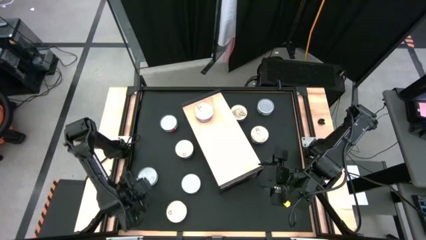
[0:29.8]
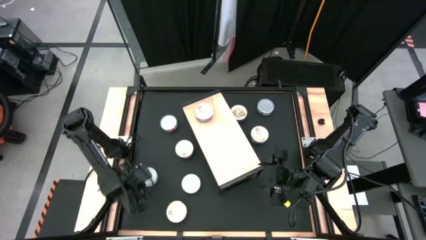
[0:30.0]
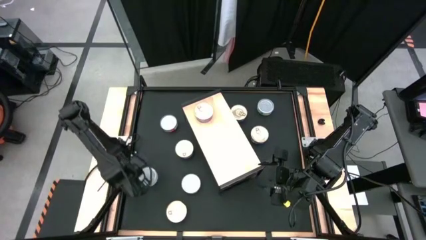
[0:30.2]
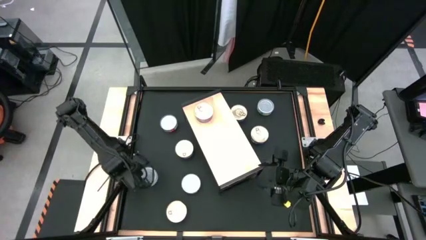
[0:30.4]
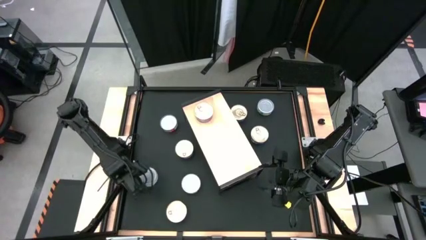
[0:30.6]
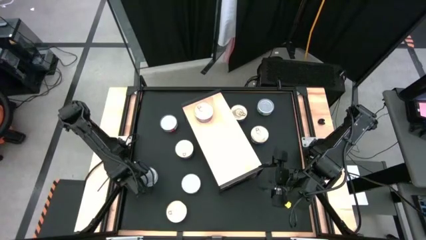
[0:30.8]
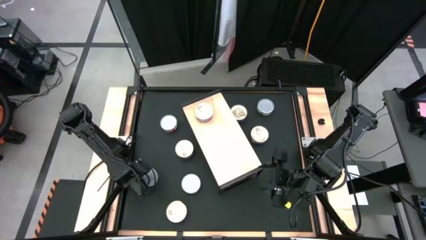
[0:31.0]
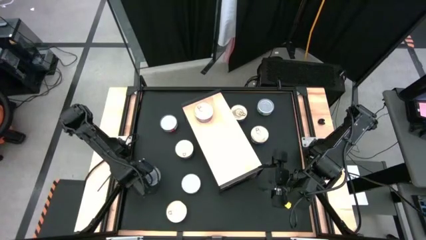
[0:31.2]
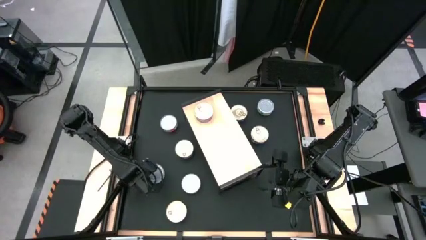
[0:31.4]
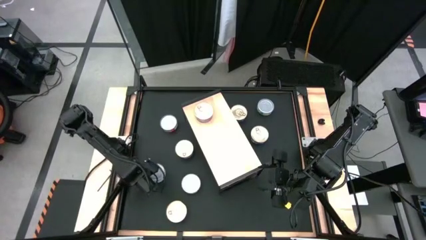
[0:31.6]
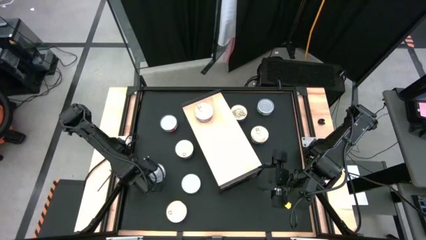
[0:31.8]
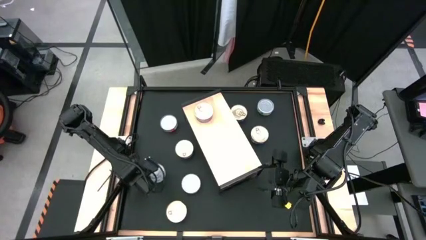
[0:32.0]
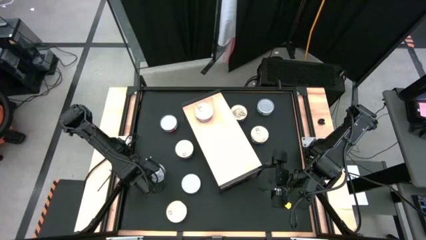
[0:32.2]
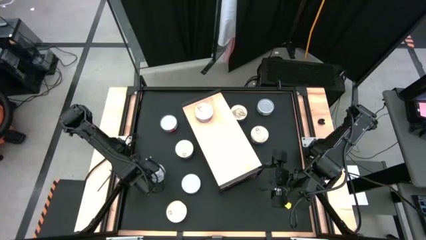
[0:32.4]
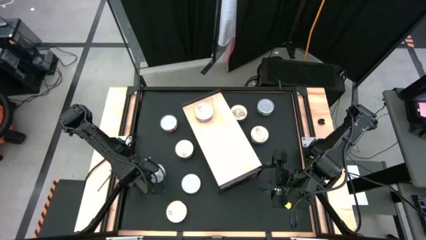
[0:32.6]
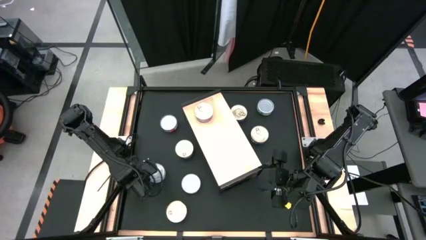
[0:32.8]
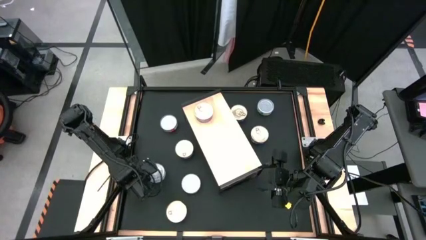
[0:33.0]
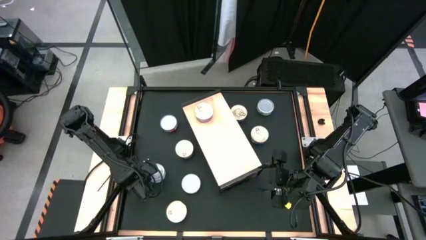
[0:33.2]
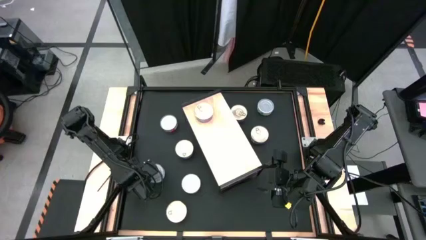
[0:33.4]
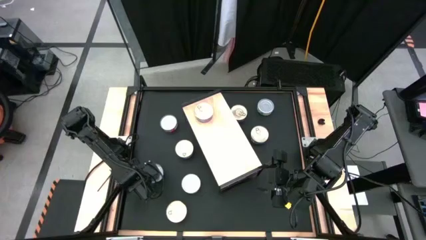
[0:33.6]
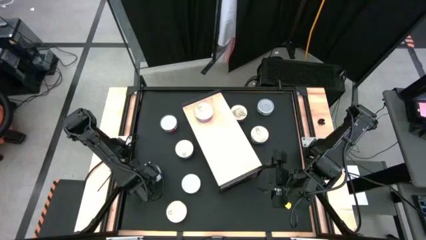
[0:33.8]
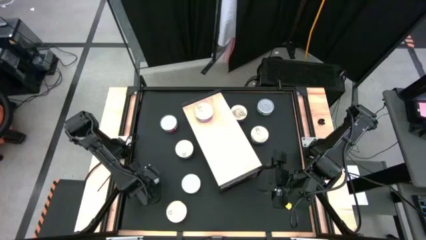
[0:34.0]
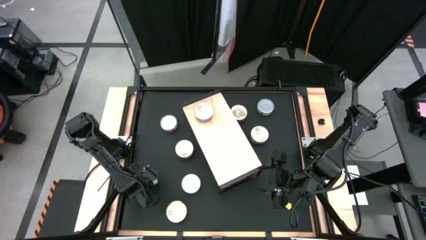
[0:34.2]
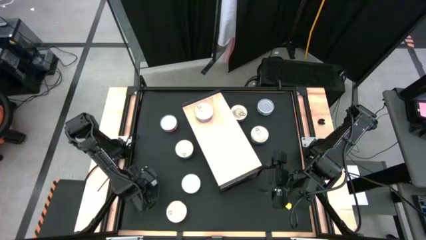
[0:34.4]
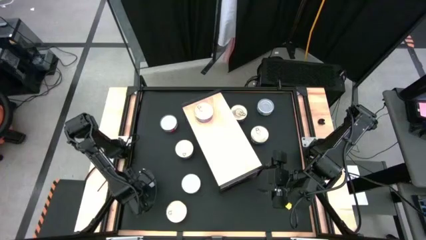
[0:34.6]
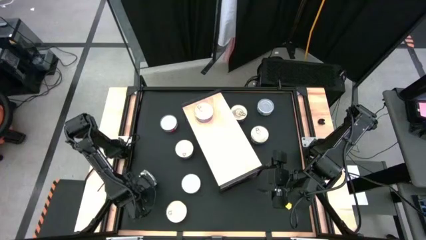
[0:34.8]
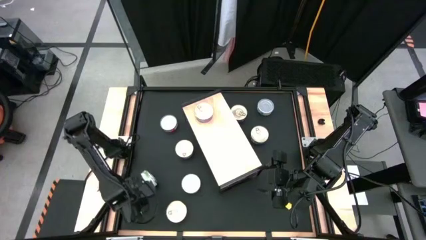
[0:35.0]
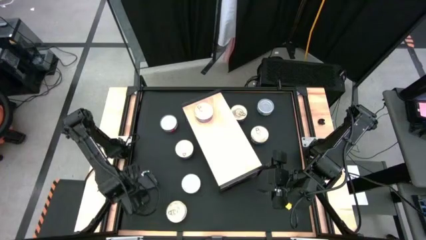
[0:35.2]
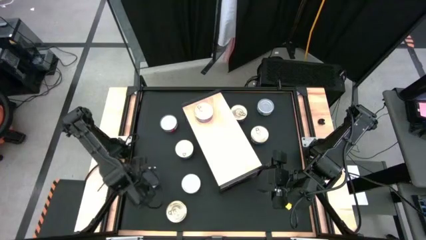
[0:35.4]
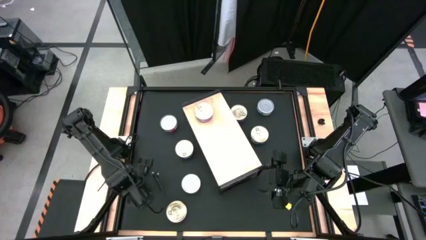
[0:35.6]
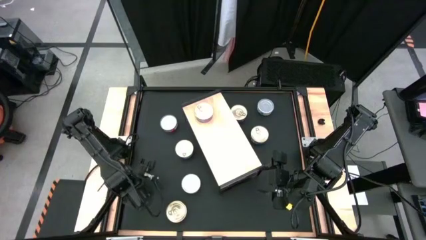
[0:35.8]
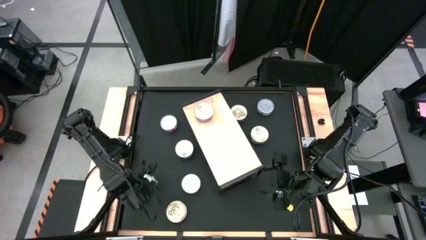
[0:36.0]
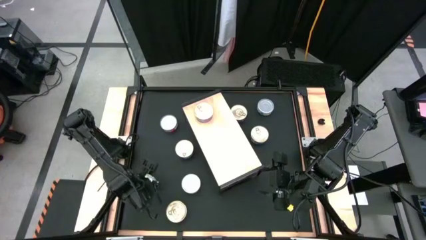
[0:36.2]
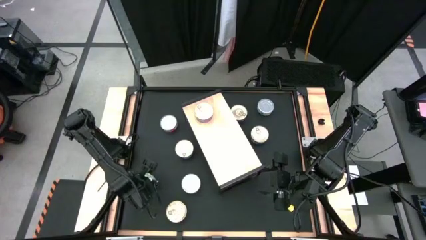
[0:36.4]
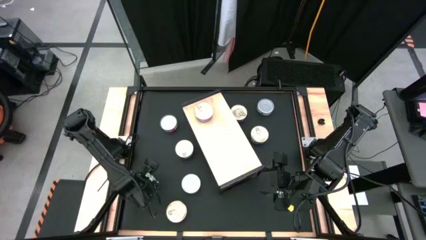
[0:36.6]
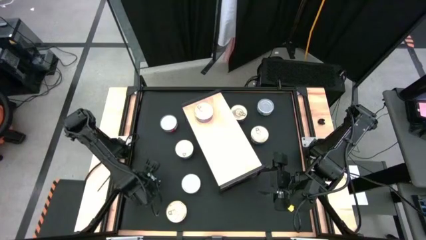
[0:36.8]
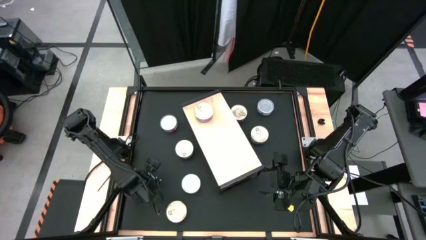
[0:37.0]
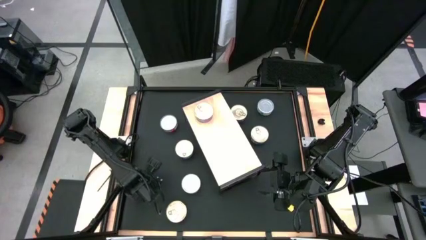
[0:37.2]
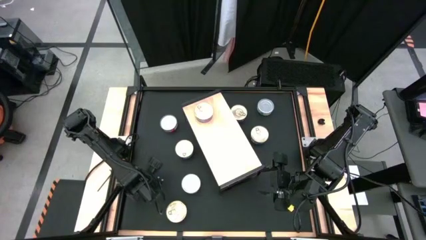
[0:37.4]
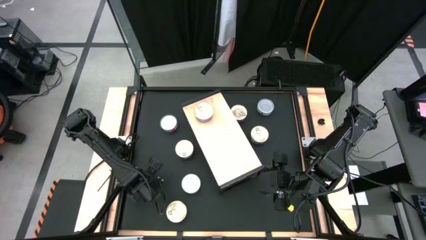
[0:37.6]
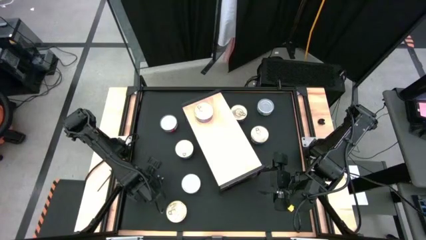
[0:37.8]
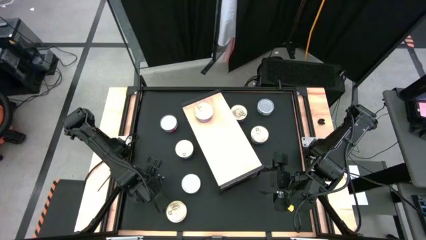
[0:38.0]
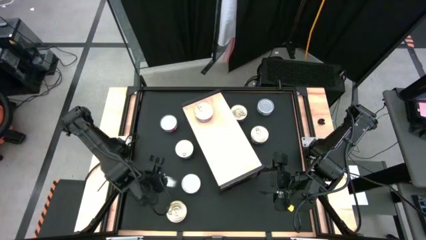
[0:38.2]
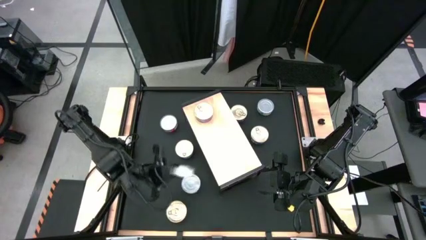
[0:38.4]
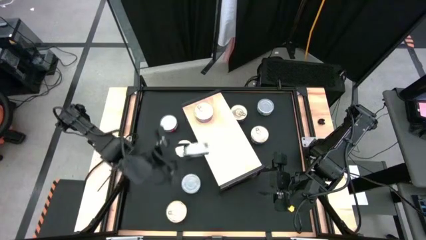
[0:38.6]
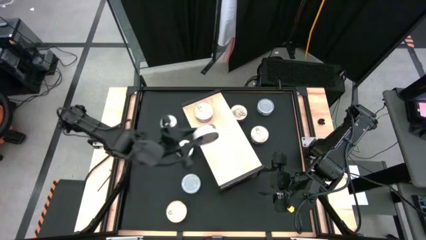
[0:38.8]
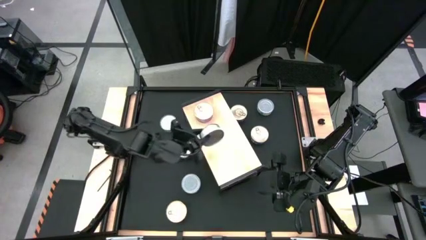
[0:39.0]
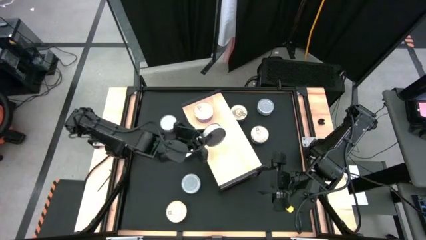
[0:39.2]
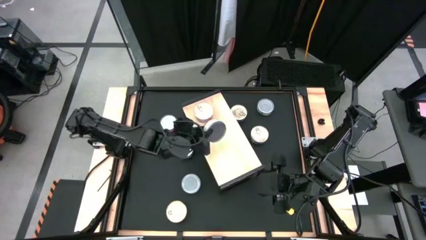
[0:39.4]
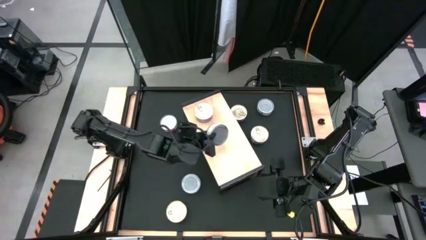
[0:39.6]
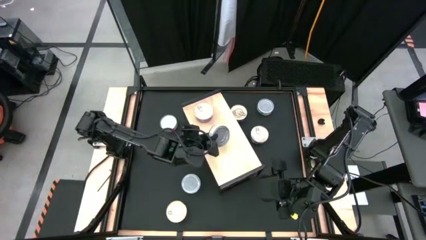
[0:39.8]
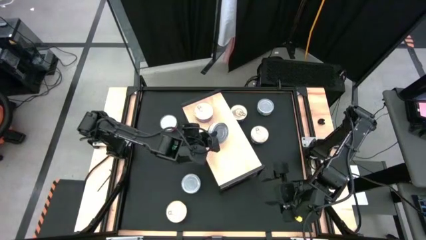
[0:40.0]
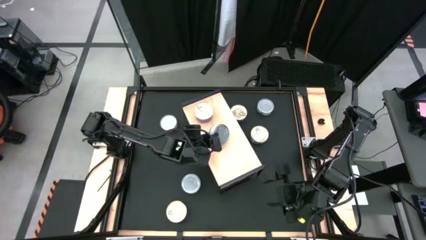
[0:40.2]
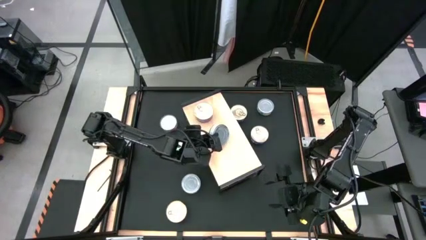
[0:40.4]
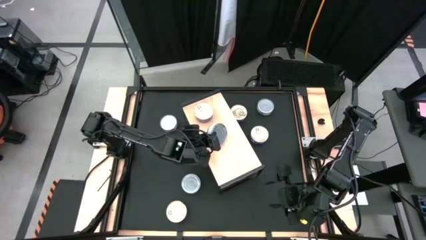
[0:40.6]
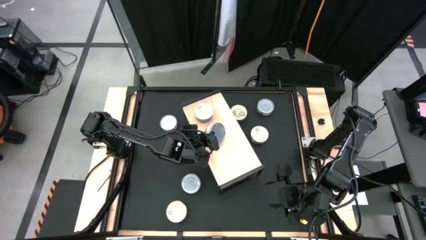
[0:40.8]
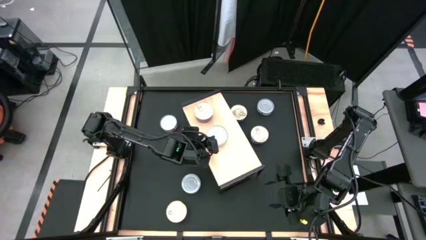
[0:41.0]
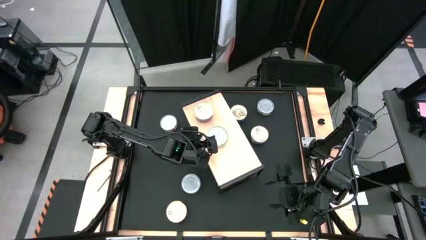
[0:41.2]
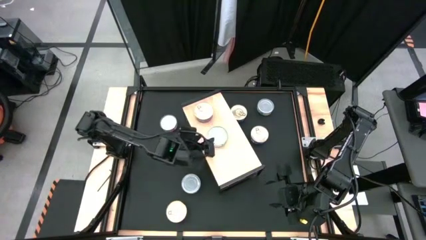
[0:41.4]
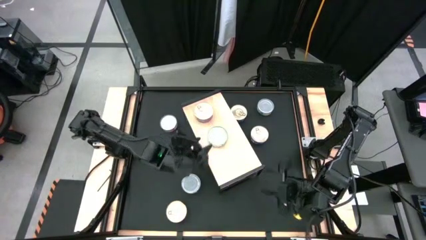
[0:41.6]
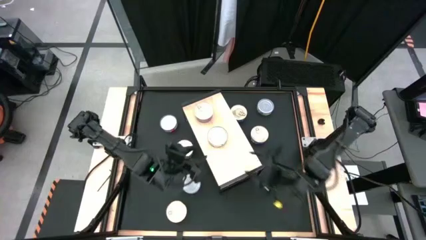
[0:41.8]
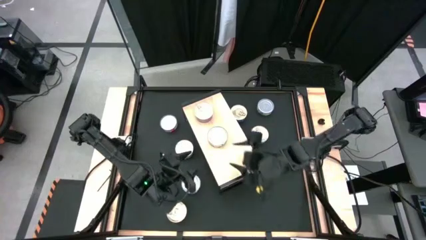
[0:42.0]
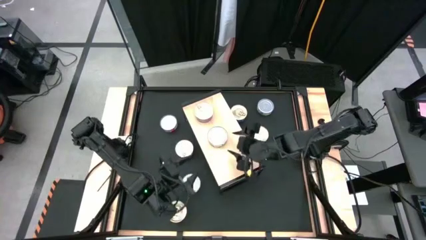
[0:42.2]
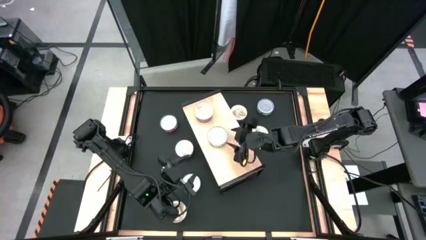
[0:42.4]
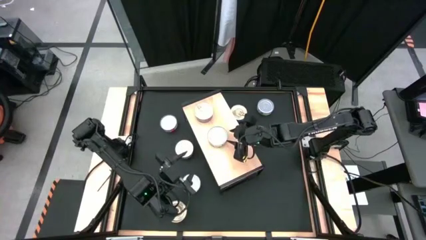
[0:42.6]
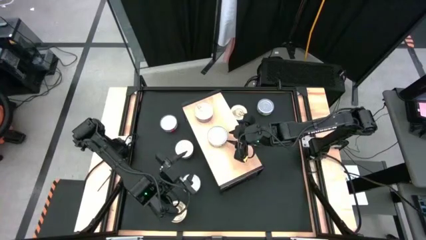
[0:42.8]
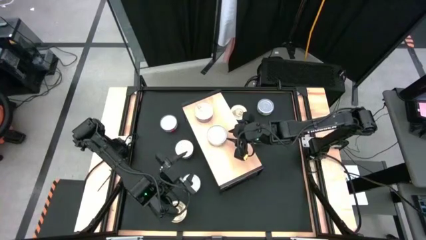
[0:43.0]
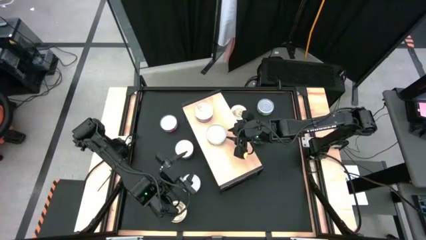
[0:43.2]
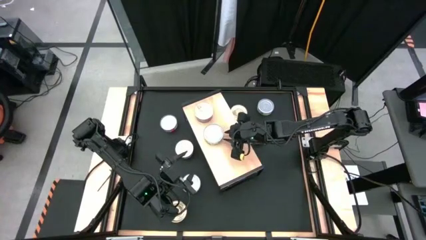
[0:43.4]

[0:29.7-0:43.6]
Task: Stack canned seafood by type on shelf
Put the green tuna can on the shelf

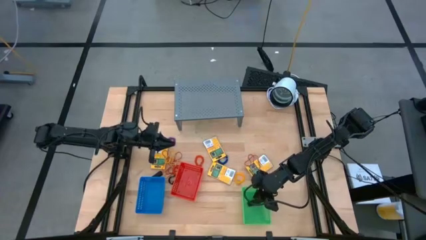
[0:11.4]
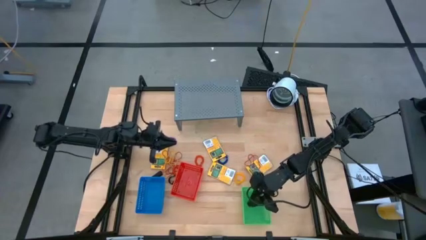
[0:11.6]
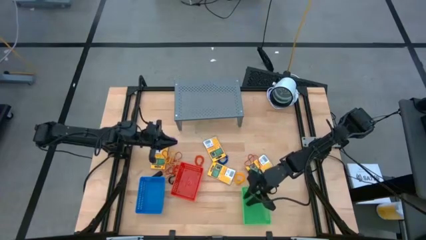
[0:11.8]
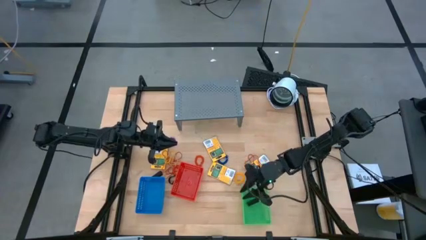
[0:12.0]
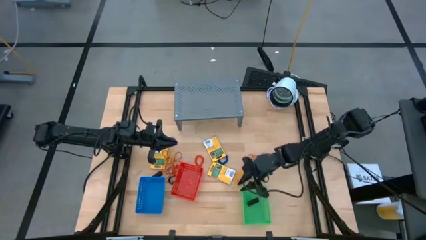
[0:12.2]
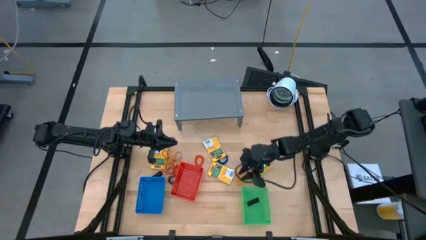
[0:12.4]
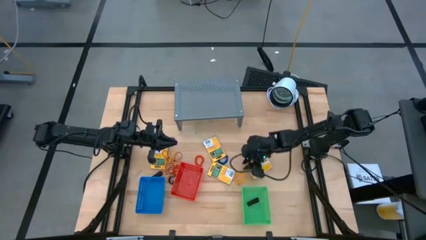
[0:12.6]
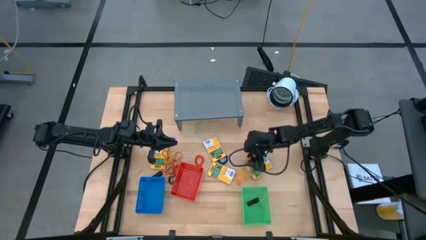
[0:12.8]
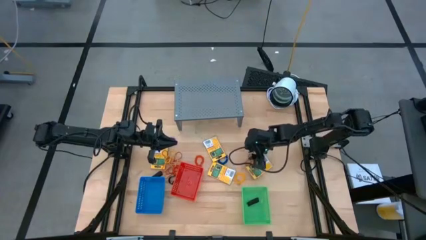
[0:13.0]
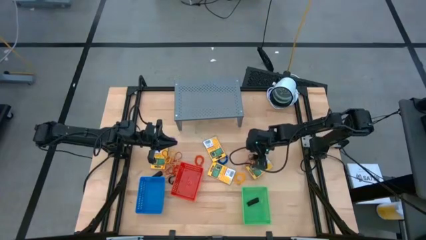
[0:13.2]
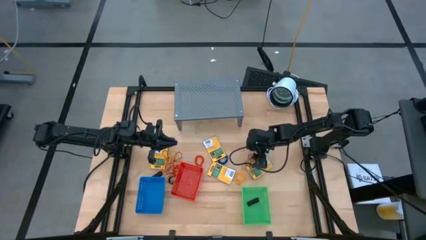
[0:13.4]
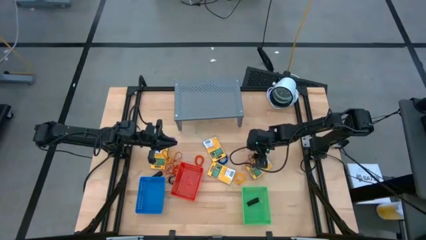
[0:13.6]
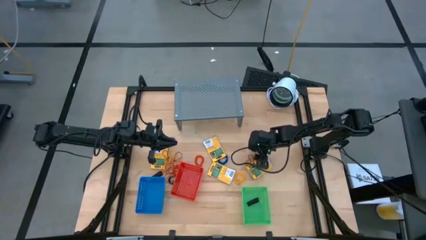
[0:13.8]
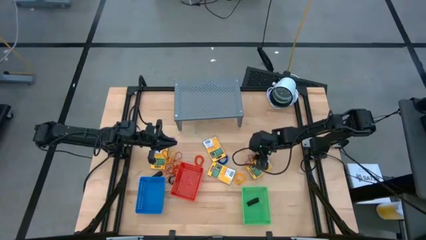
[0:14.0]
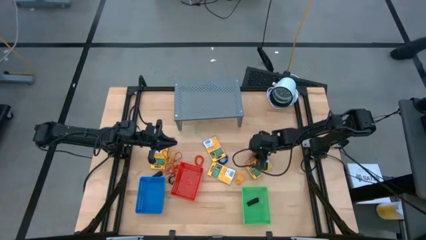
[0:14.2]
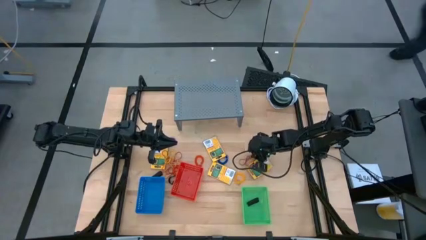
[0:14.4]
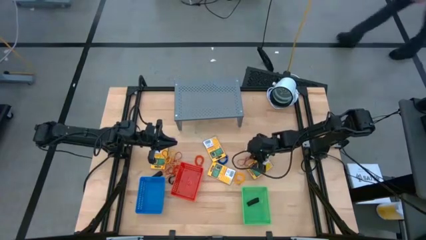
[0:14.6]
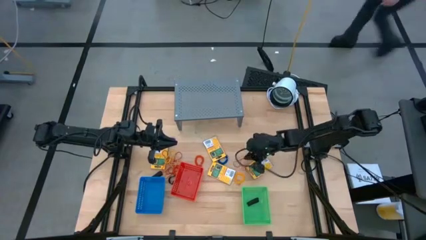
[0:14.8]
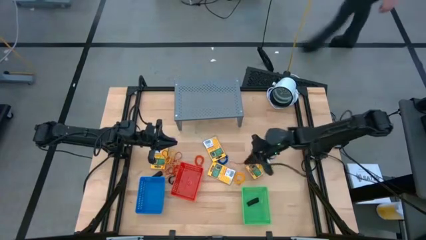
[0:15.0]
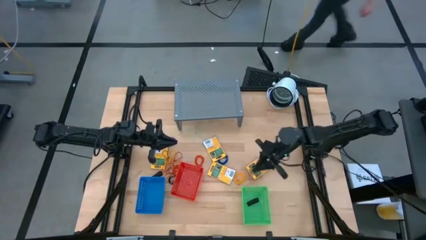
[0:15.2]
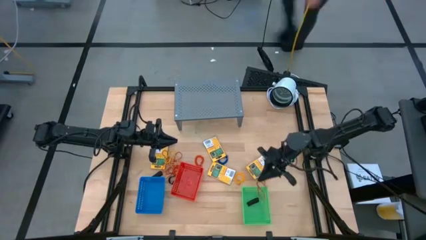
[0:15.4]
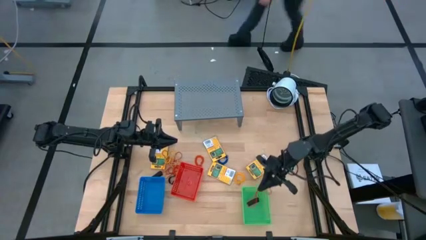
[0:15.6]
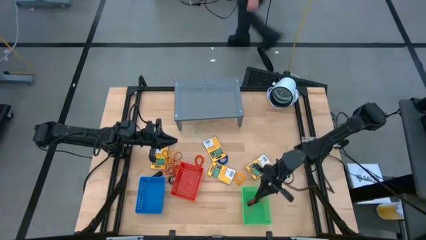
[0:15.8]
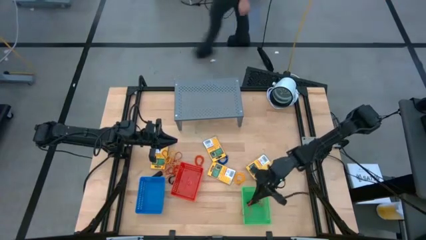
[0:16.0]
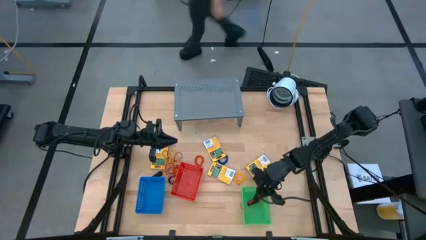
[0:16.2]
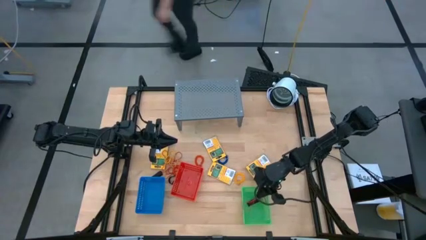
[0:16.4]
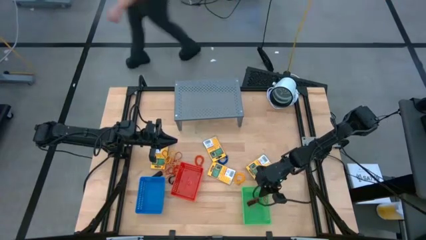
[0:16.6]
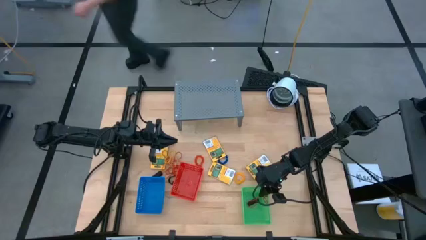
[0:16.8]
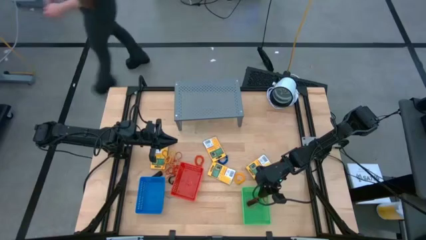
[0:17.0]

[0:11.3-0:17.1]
Task: Pick & Place Office Desk Supplies
Put the right red rubber band into the green basket
